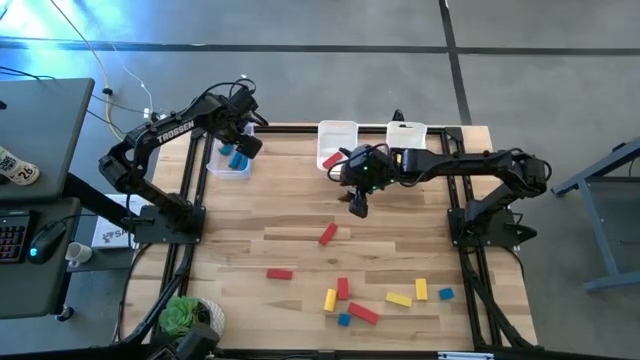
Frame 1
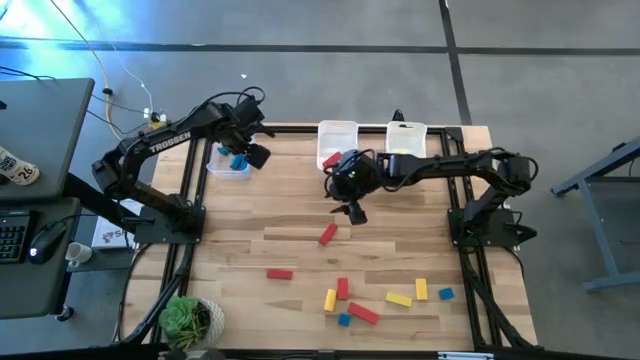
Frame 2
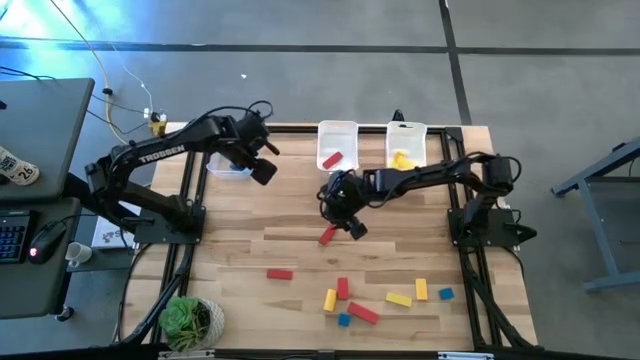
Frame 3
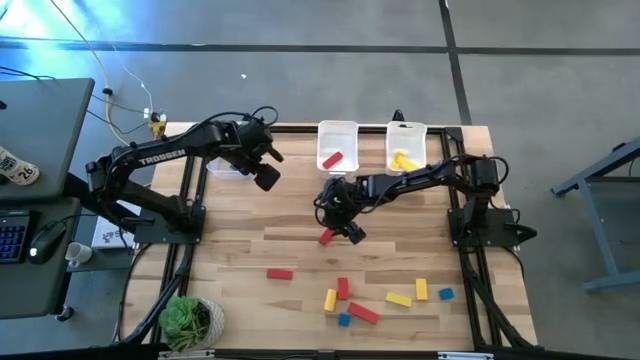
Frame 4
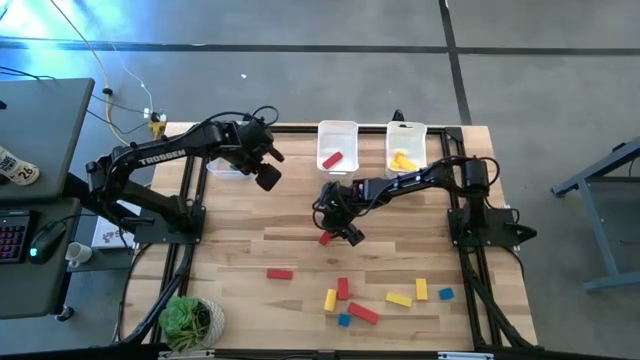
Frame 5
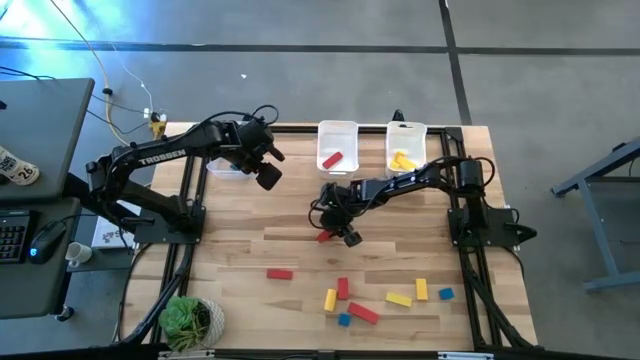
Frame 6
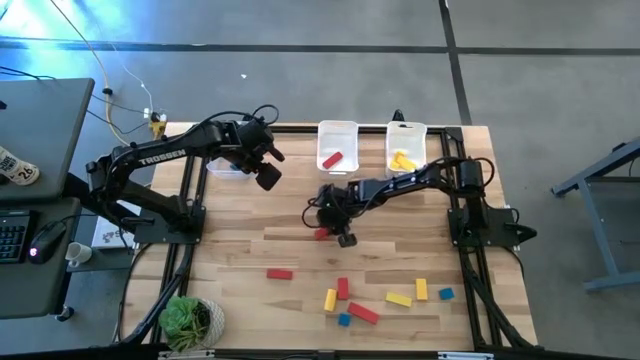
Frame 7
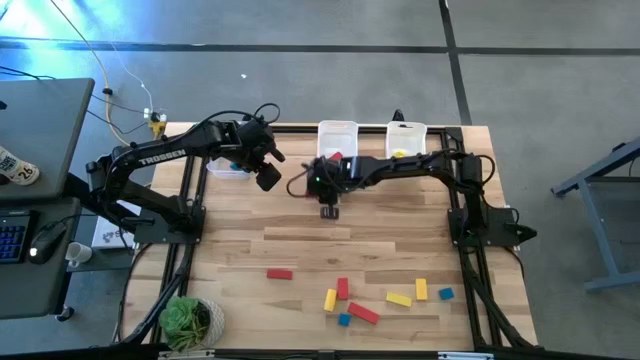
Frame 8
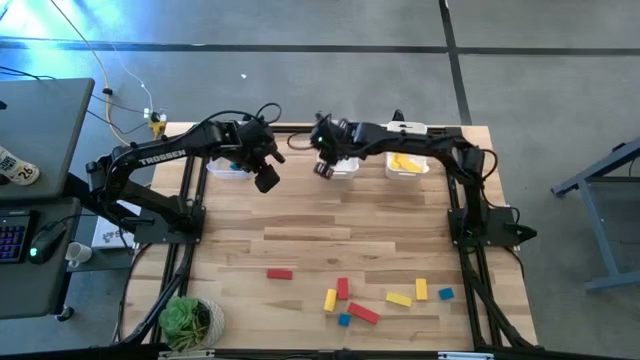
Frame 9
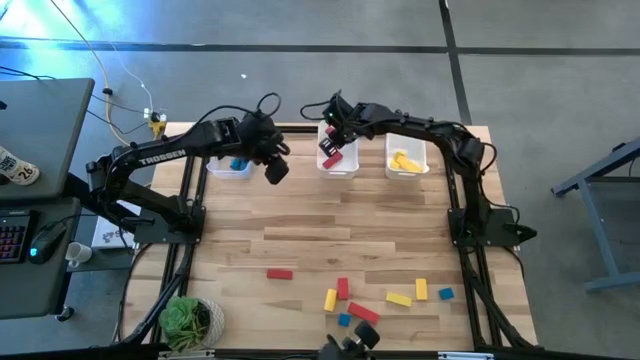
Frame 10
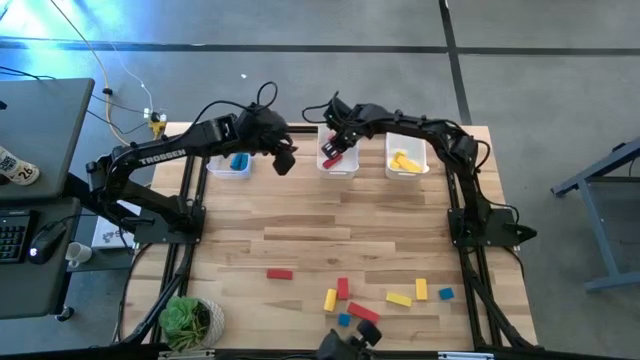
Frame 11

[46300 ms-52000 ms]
Task: Sort & place blocks by color
Put the red block into the left white bin

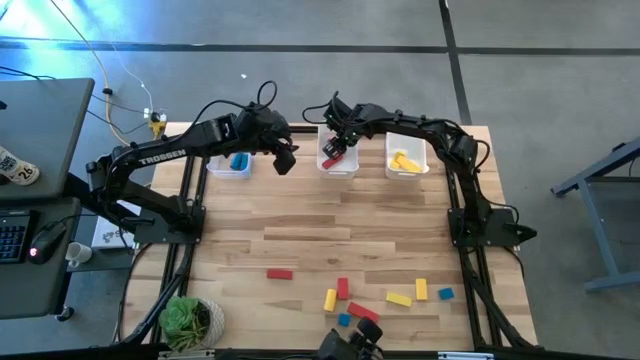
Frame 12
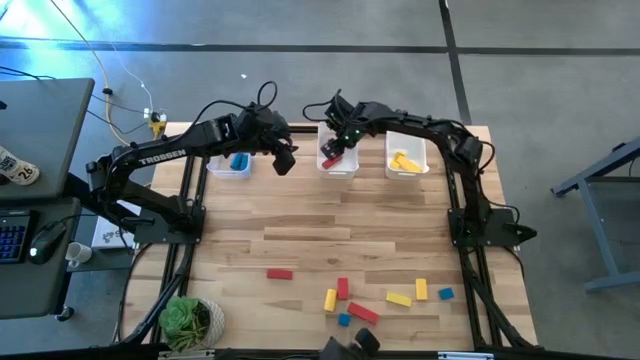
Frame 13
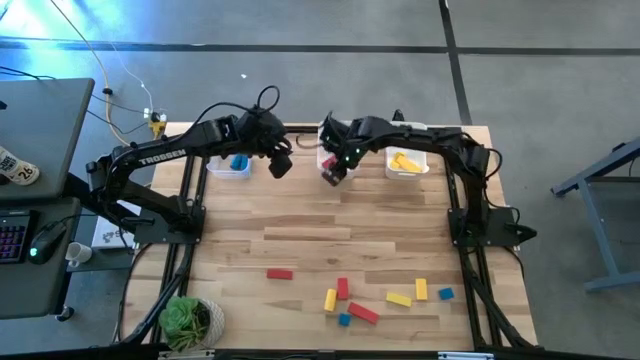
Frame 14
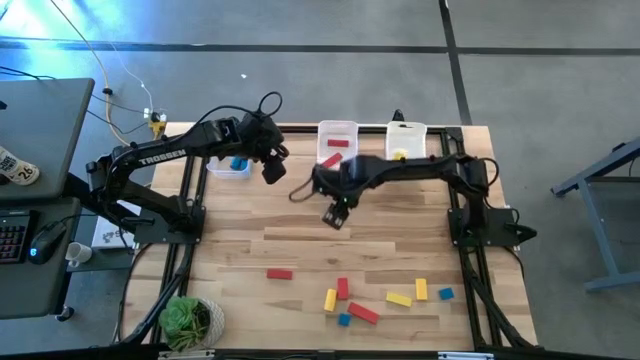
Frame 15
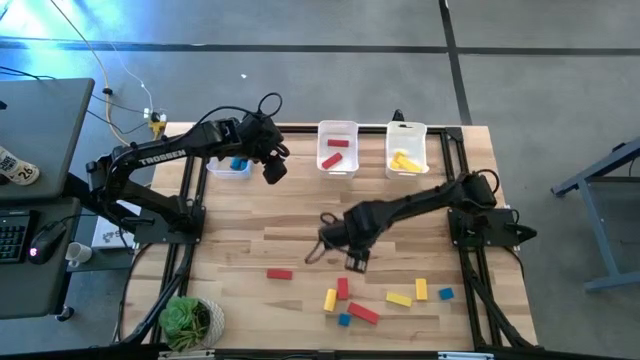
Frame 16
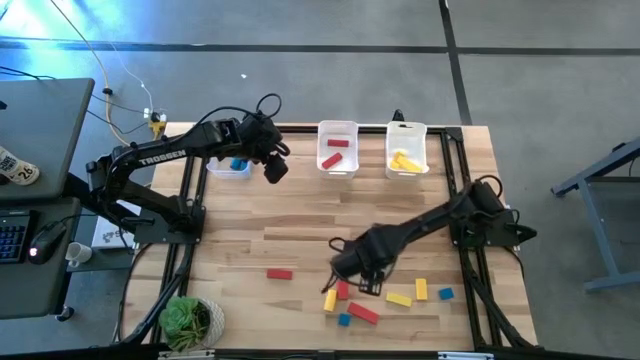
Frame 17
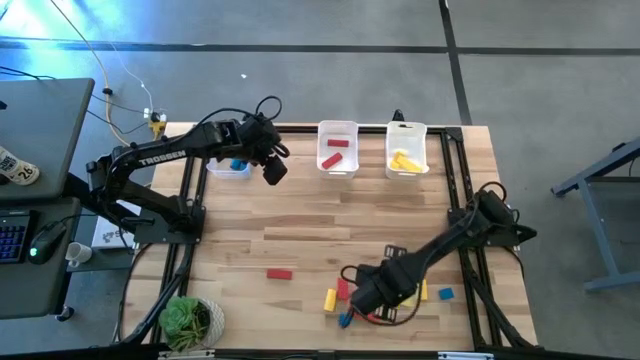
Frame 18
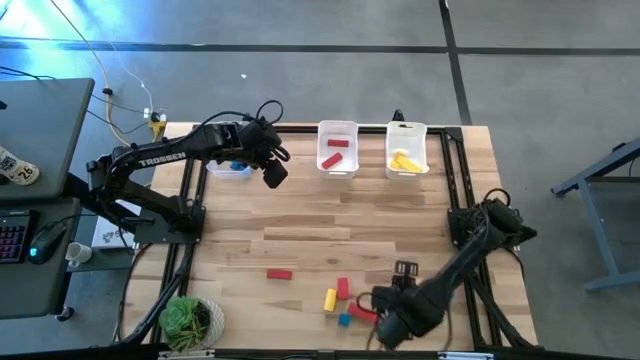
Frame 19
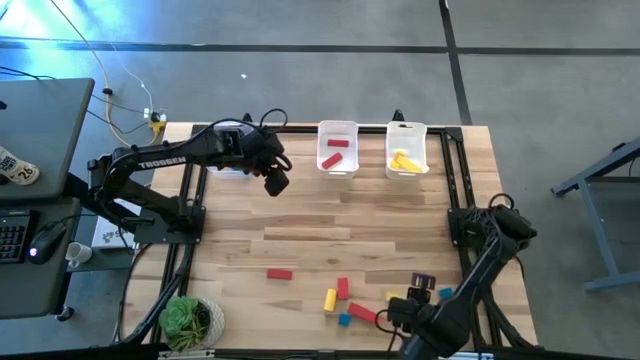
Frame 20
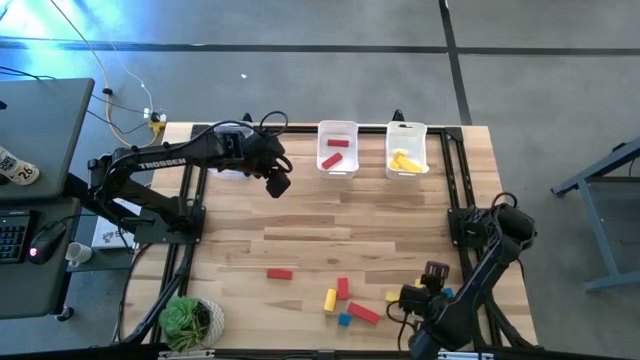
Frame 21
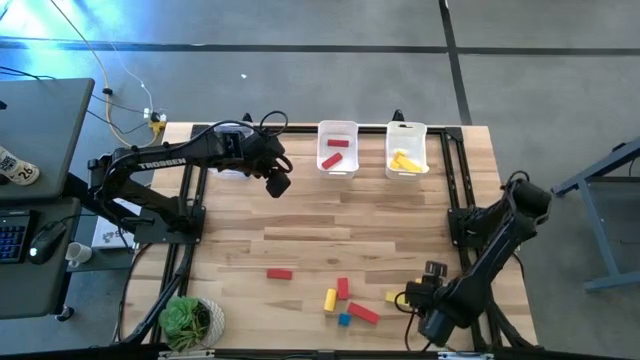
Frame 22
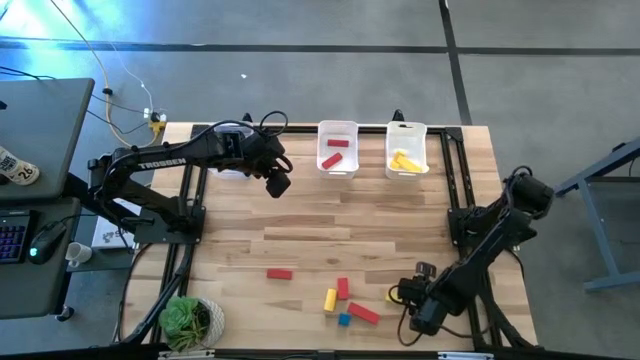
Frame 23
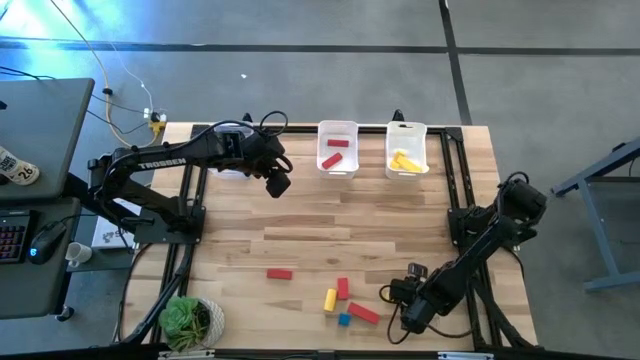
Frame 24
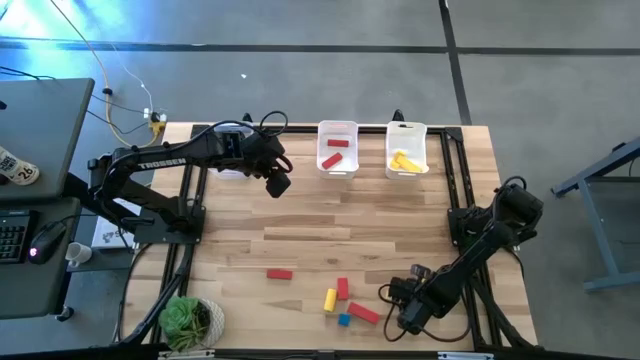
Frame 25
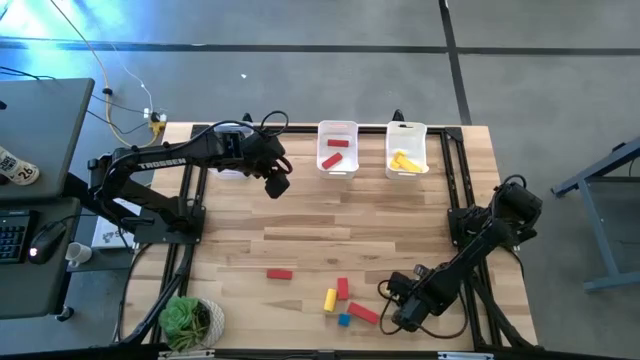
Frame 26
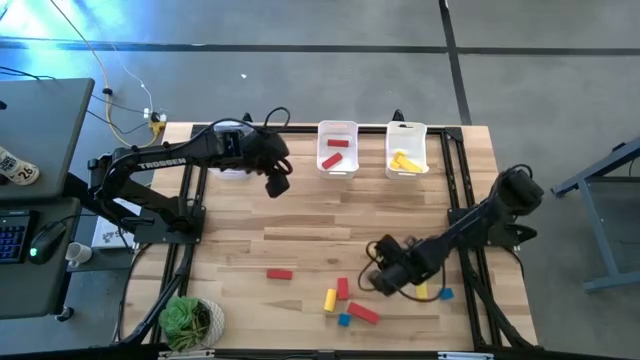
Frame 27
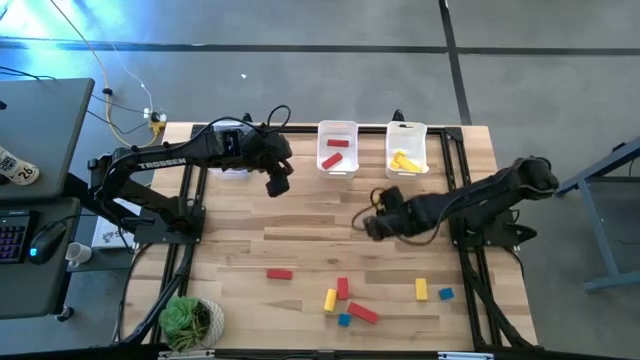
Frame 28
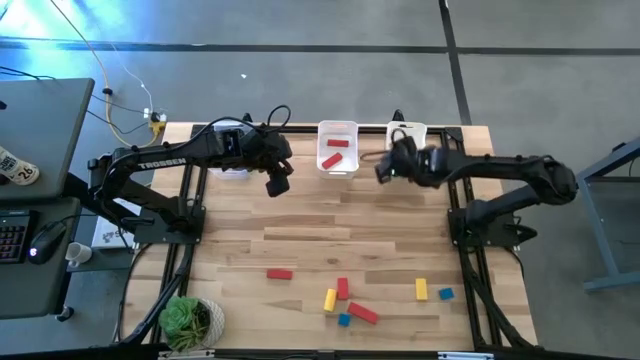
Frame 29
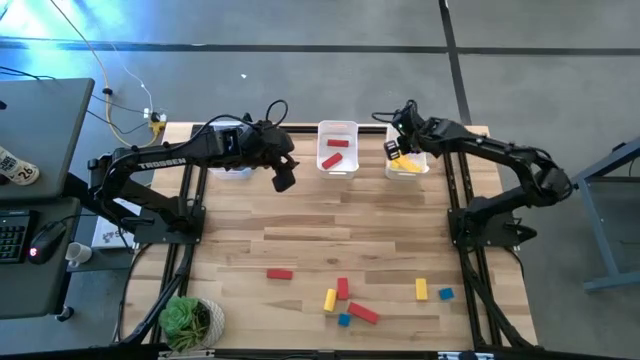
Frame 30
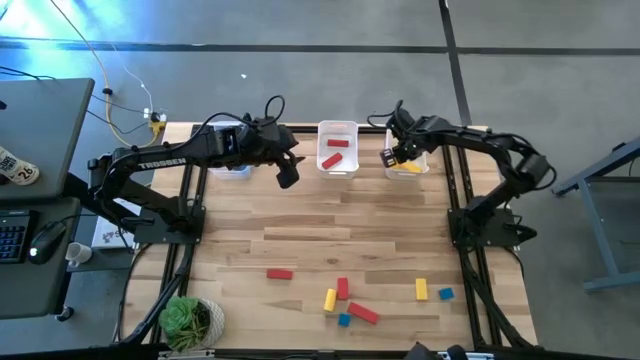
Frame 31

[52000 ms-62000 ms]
Put the yellow block into the right white bin

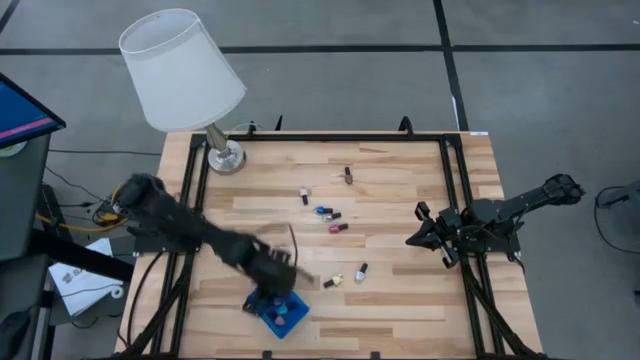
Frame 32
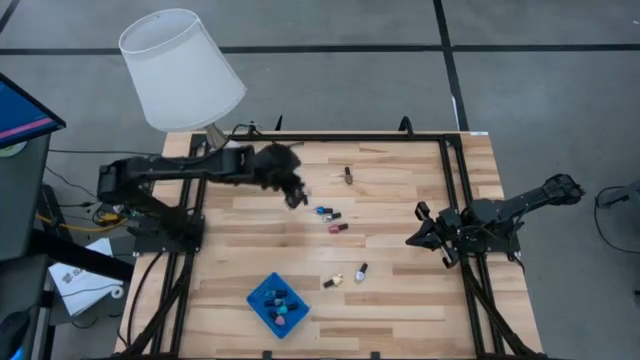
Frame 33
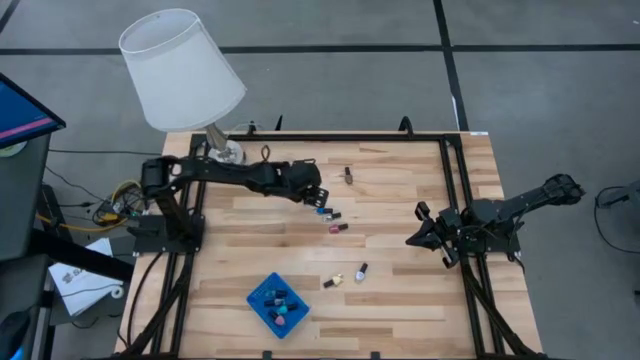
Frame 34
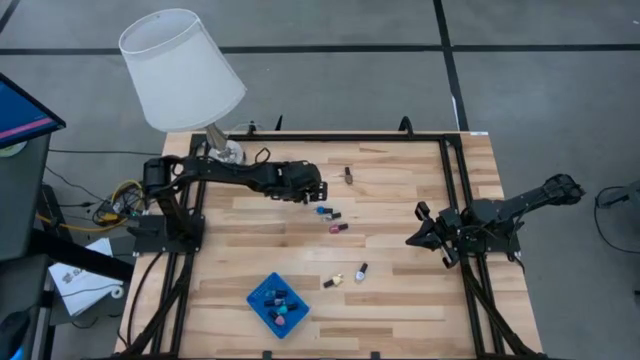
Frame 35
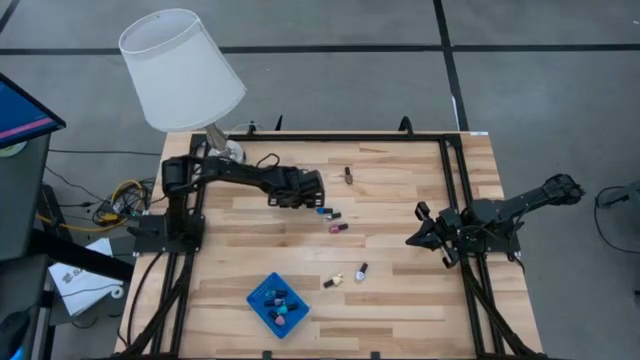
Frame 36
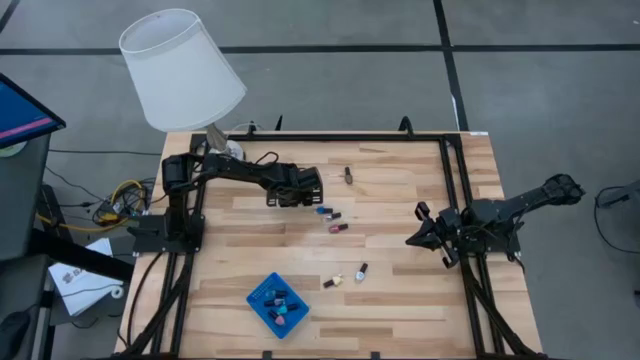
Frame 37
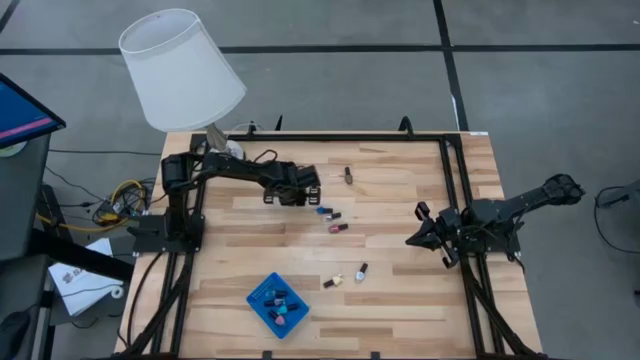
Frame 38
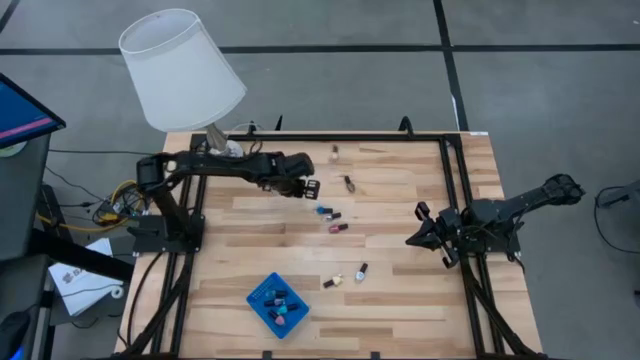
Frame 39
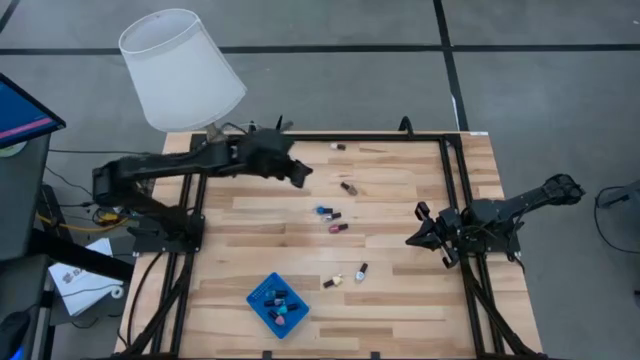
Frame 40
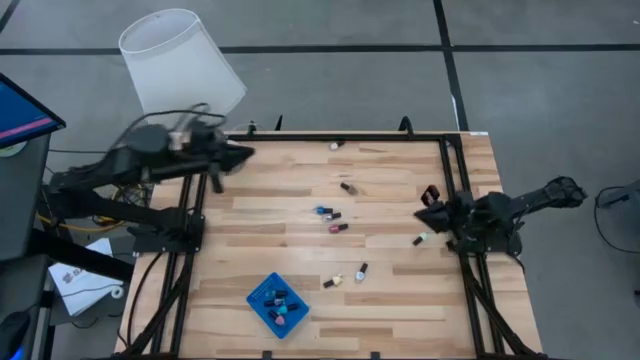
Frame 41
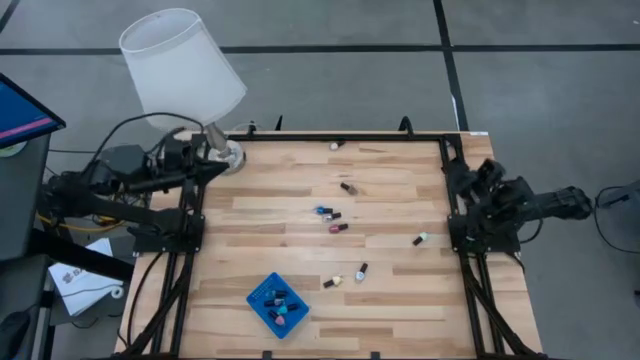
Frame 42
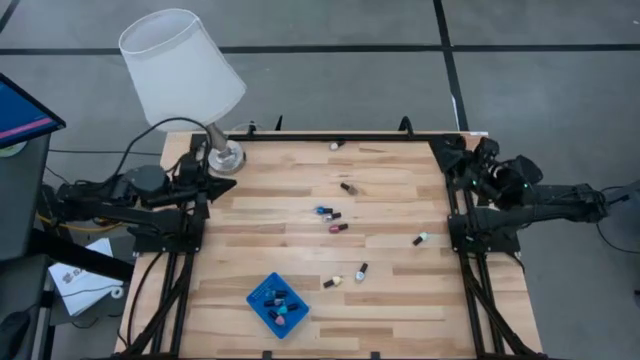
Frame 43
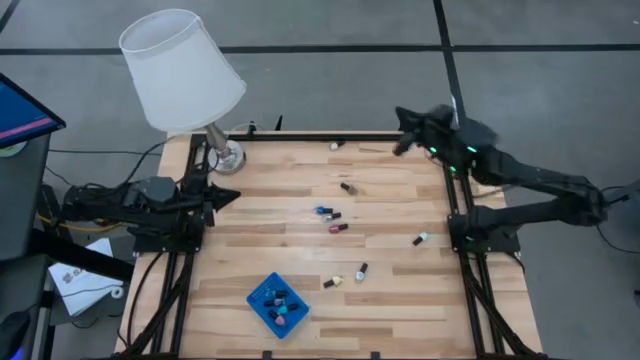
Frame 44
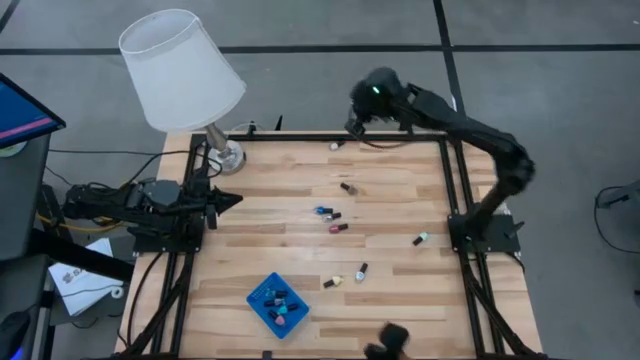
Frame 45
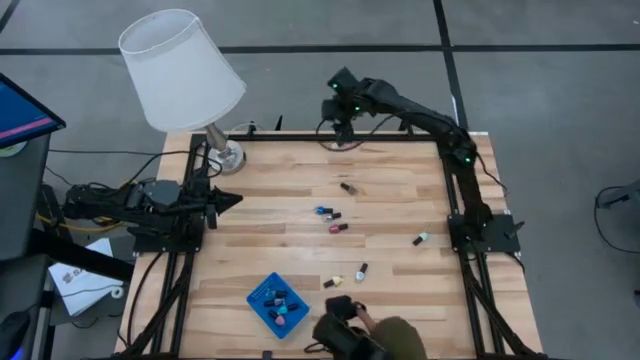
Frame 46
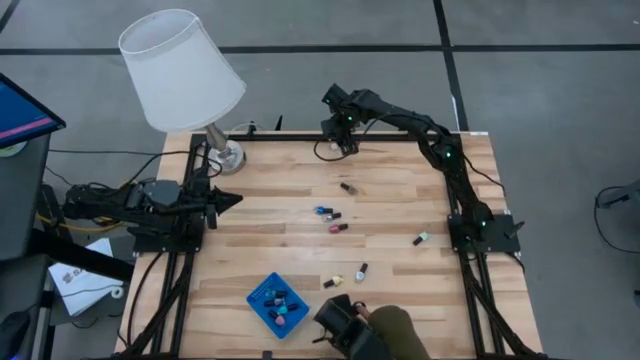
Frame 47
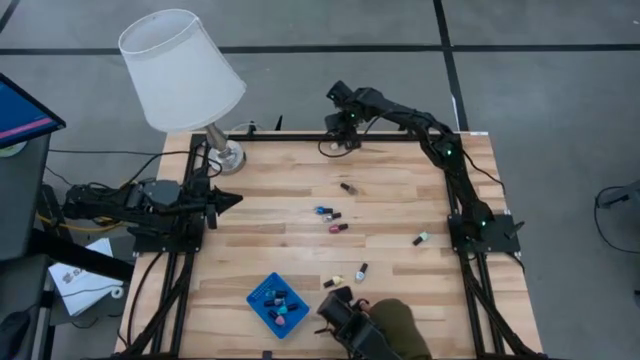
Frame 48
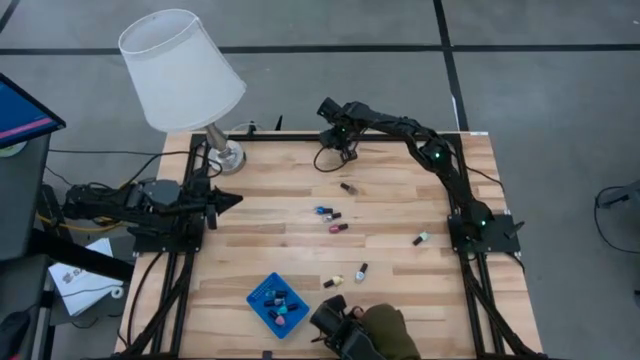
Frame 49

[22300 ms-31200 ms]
Task: Pick & Place Nail Polish
Put the top left white nail polish bottle in the blue bin
